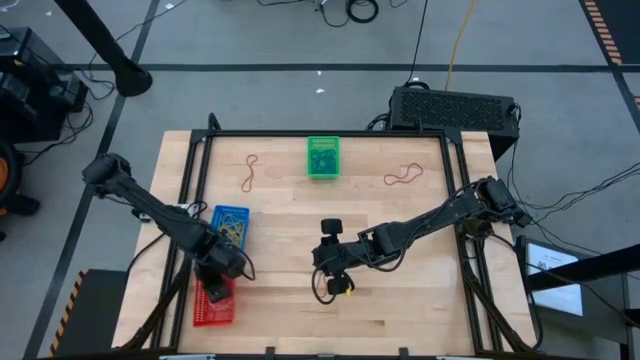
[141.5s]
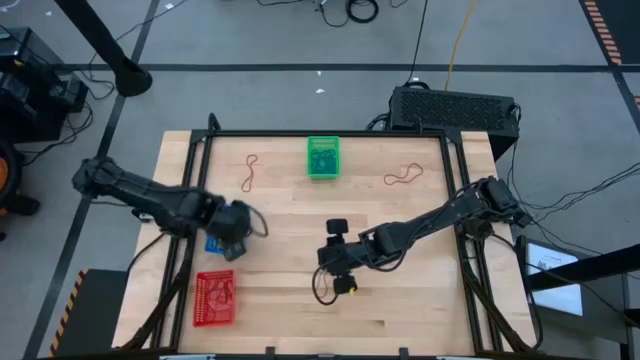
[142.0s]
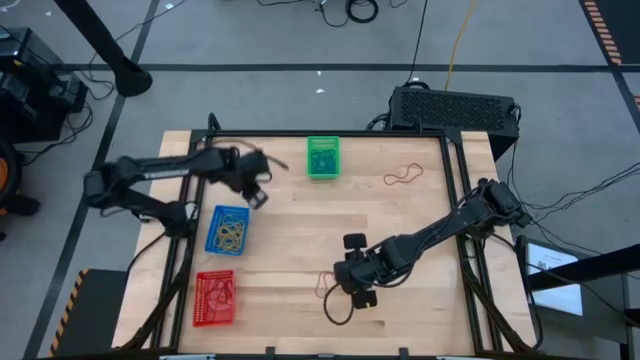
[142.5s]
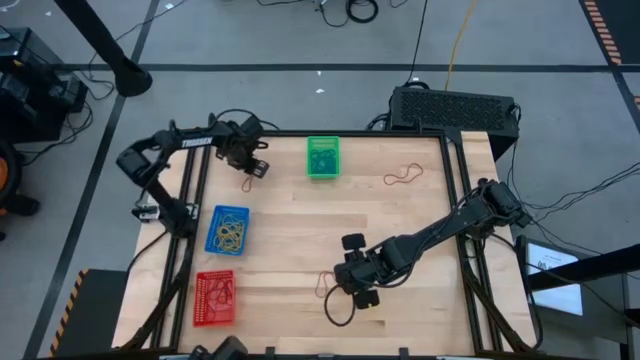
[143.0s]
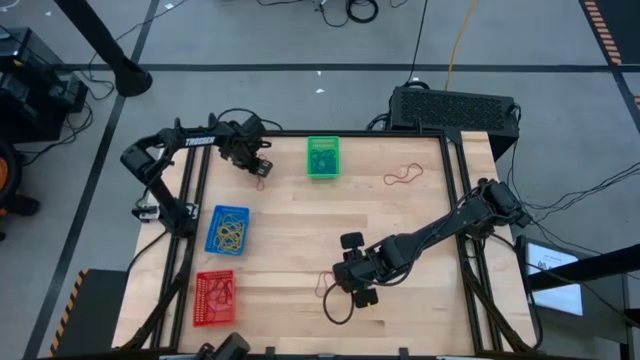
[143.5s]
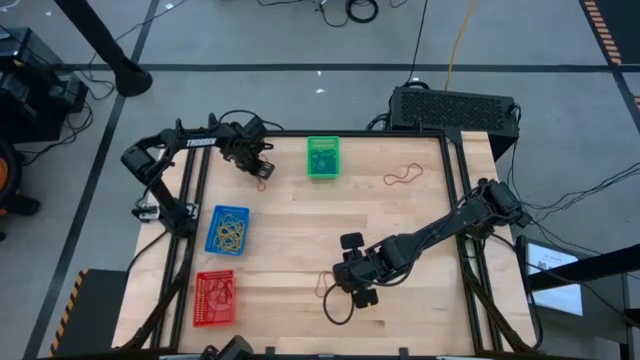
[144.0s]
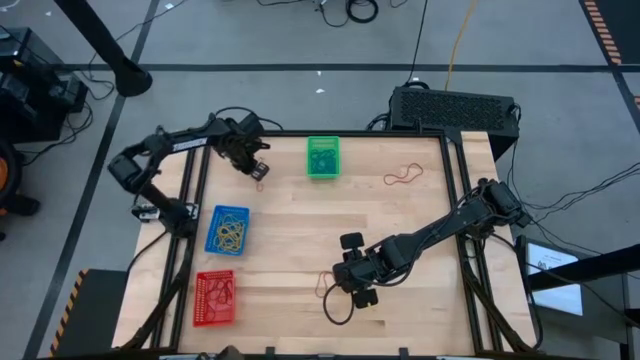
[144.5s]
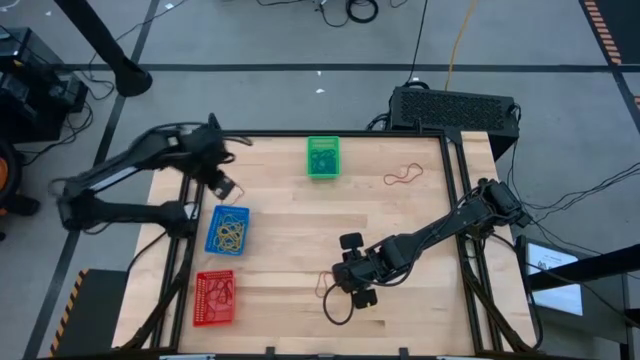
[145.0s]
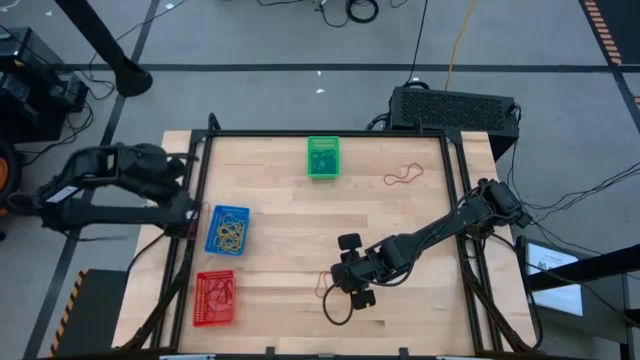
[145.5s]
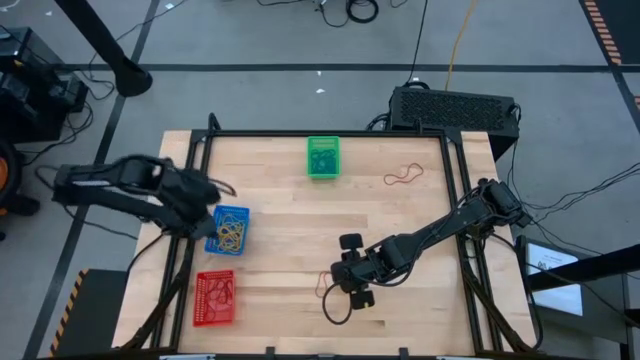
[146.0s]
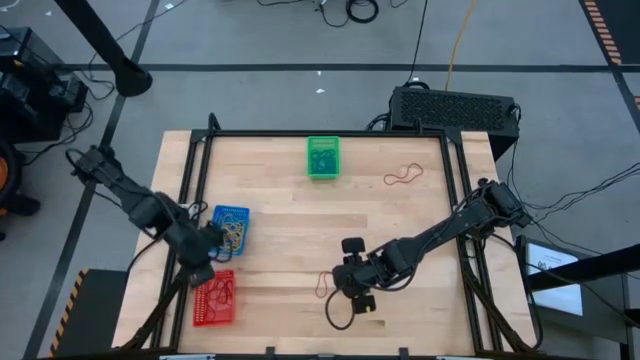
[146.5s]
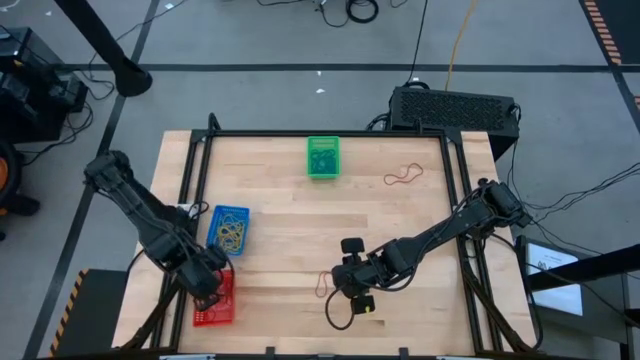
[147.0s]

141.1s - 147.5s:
Task: Sort rubber bands into baskets
Put the red rubber band into the red bin

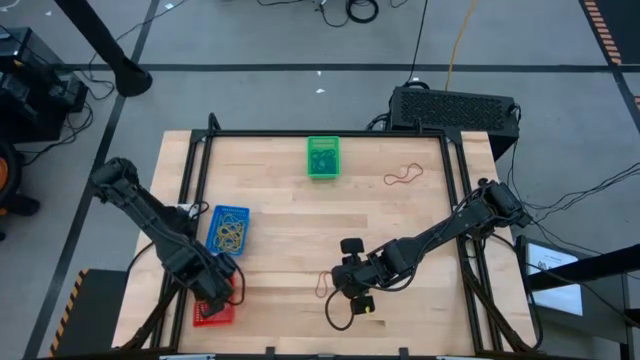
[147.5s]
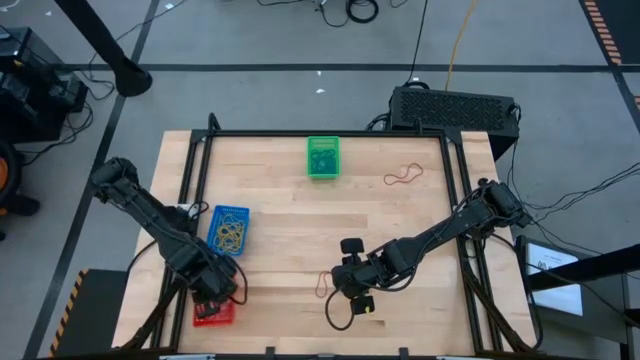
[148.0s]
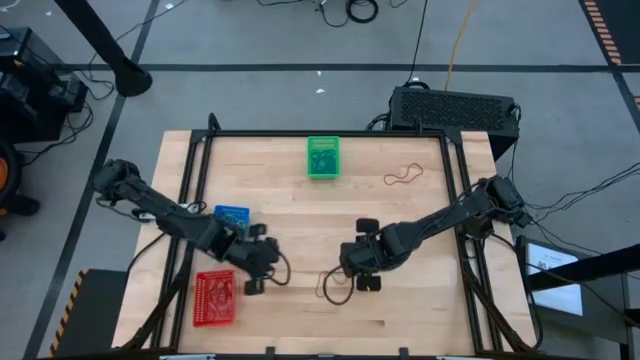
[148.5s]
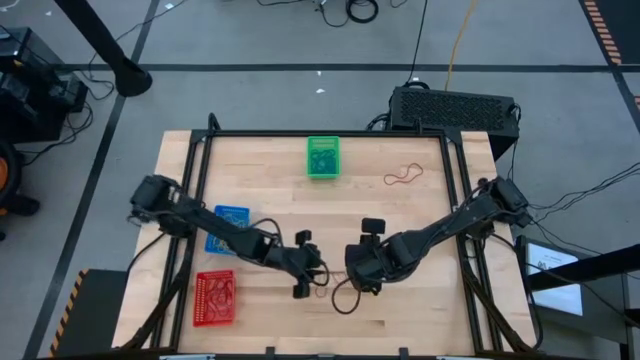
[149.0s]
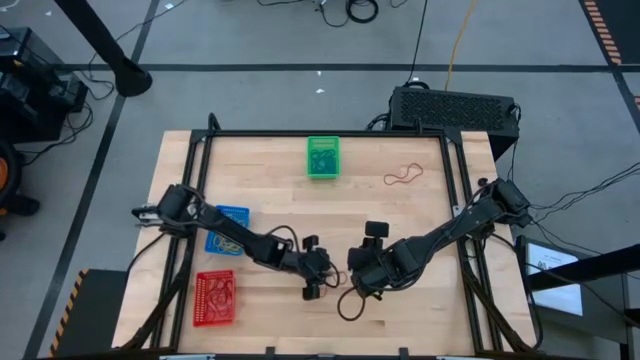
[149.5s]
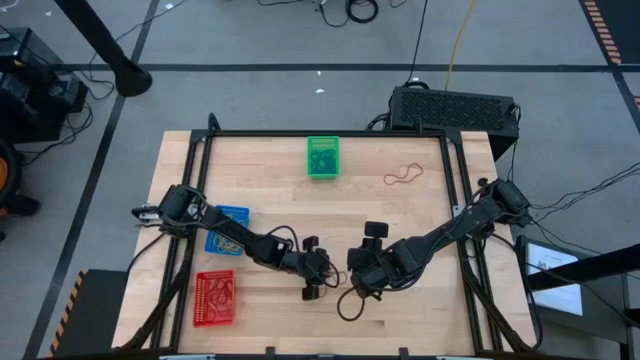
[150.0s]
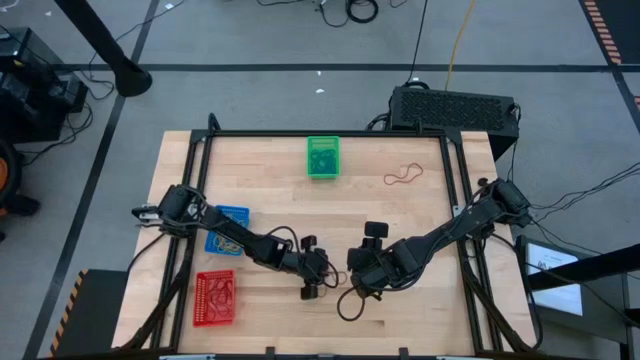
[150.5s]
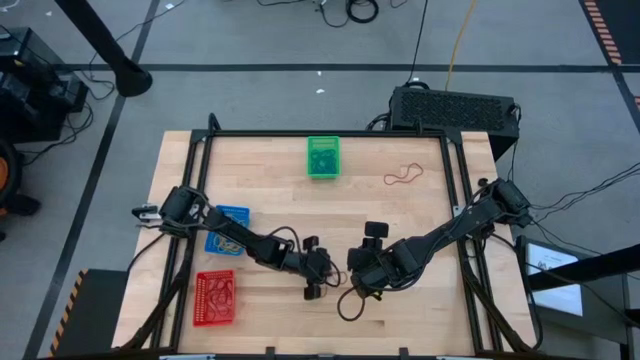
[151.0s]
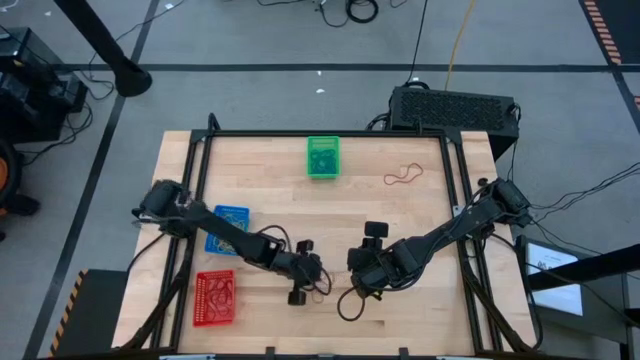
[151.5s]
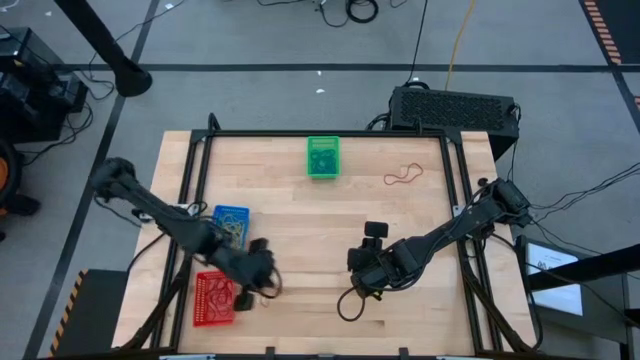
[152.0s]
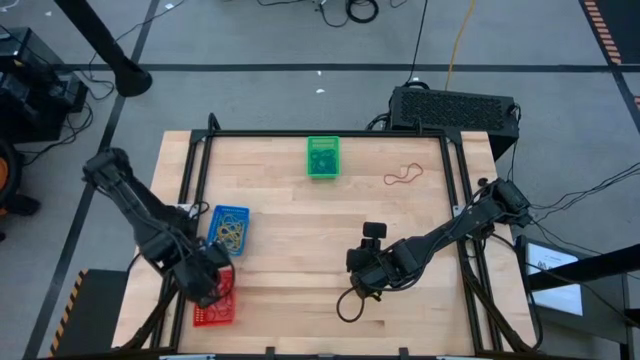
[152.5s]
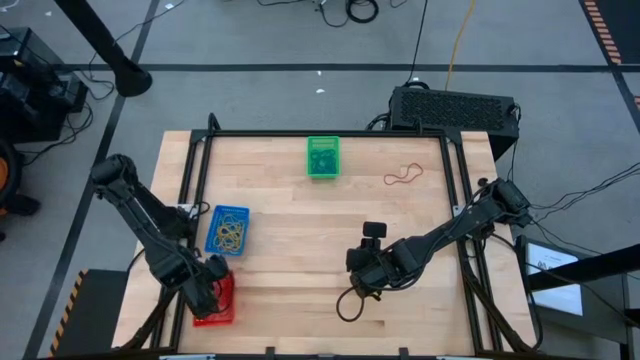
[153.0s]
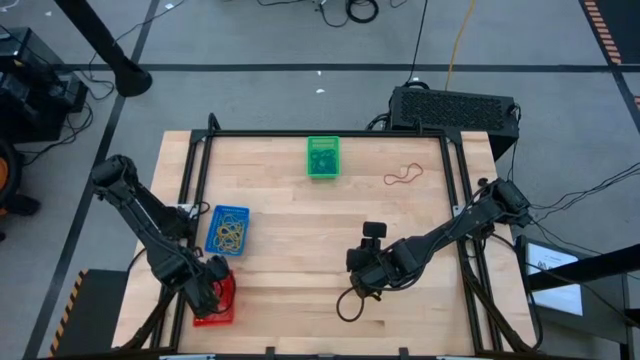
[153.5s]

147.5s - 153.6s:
Put the red rubber band into the red bin

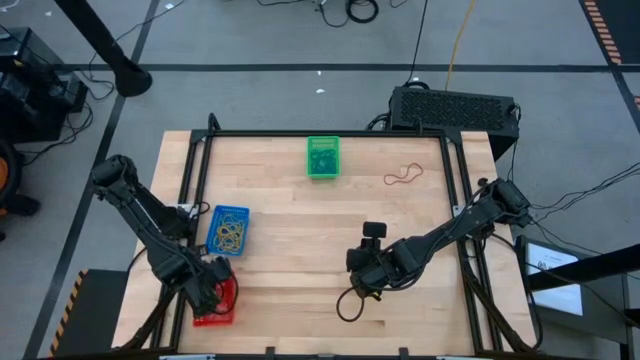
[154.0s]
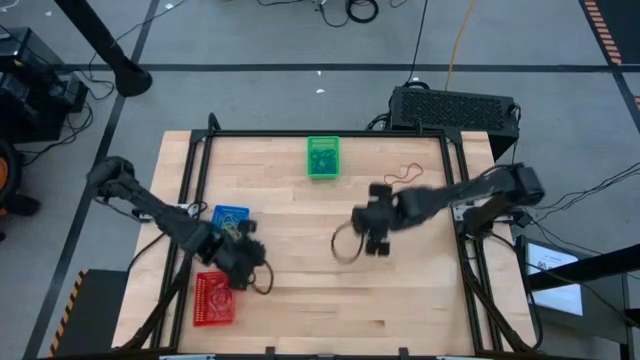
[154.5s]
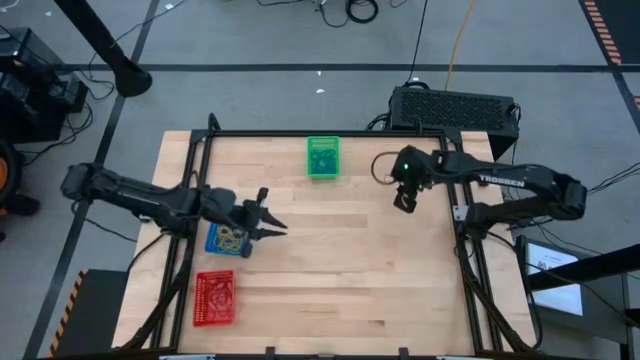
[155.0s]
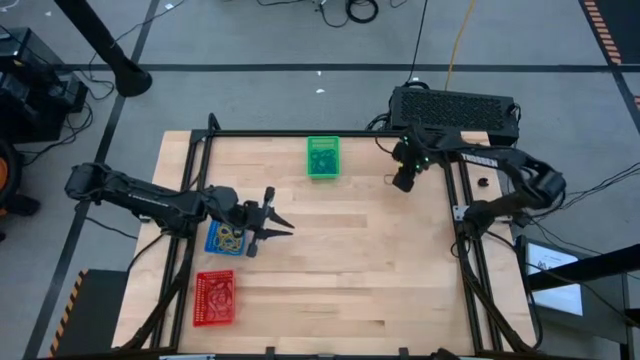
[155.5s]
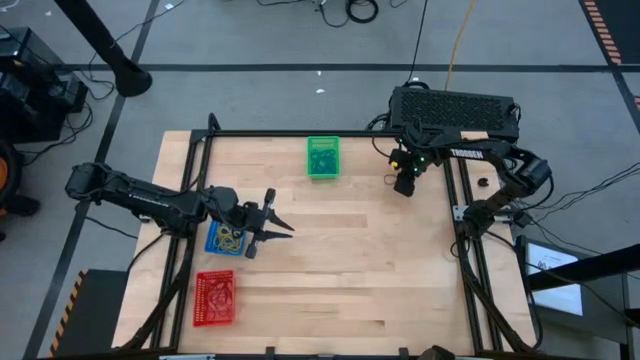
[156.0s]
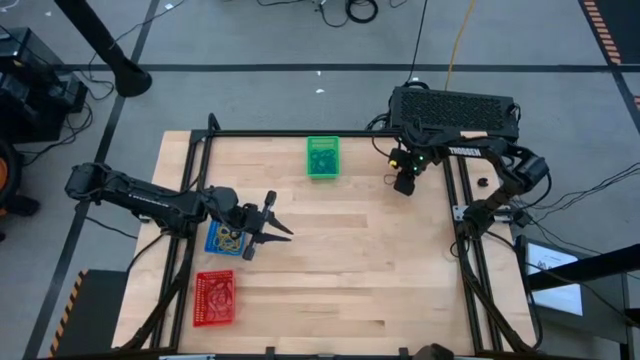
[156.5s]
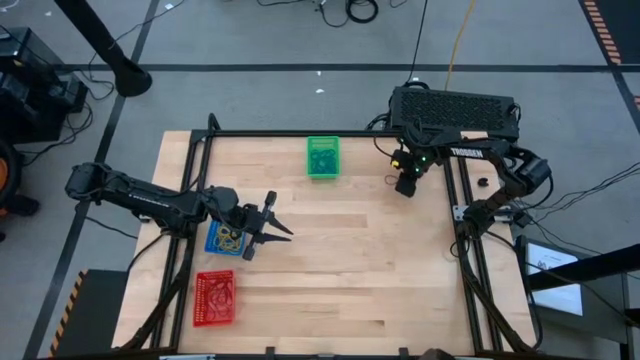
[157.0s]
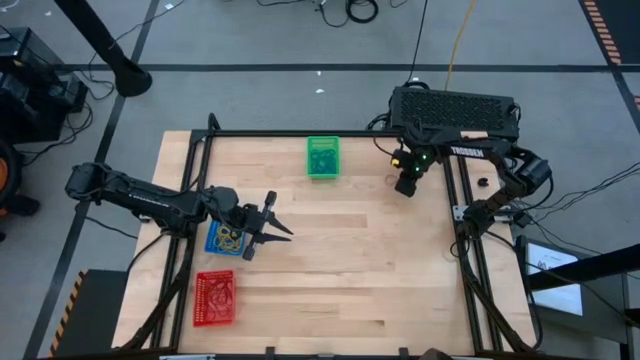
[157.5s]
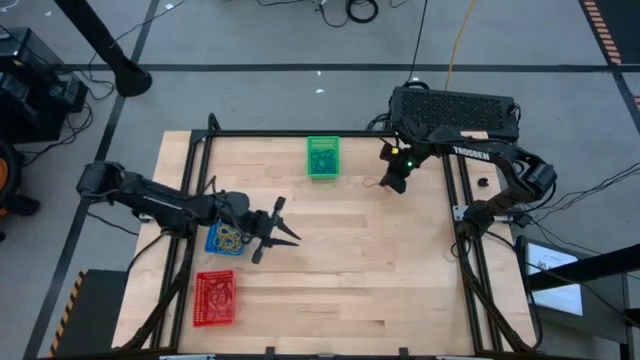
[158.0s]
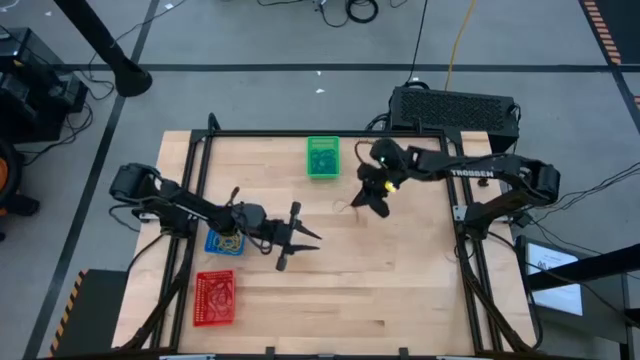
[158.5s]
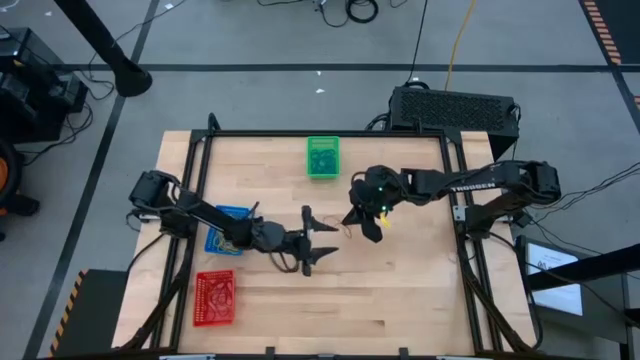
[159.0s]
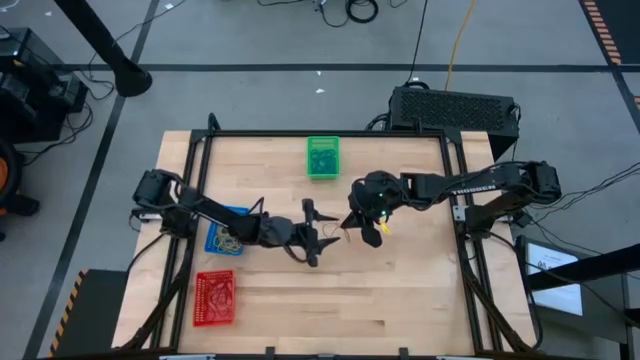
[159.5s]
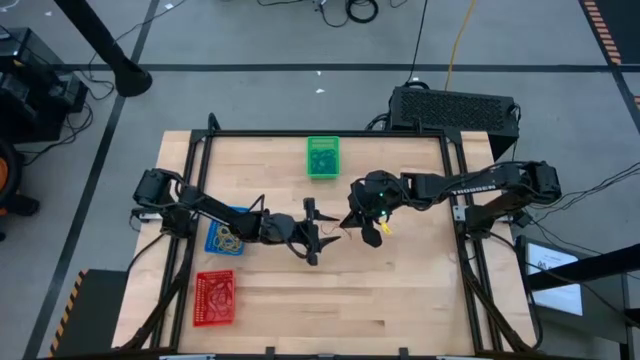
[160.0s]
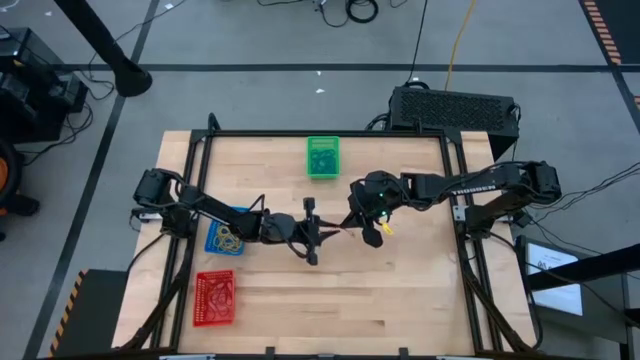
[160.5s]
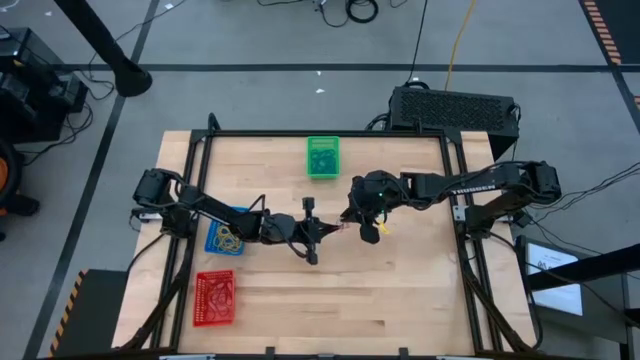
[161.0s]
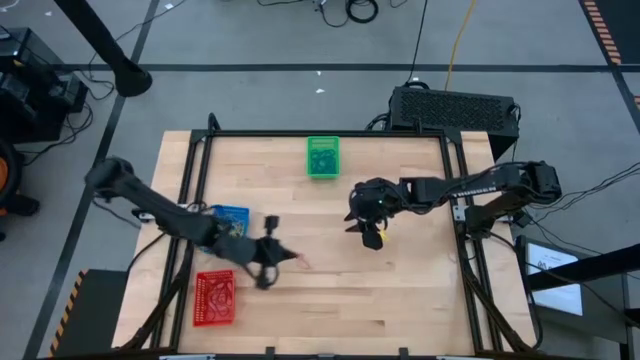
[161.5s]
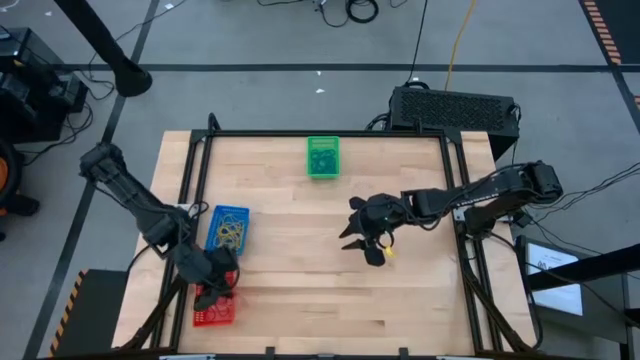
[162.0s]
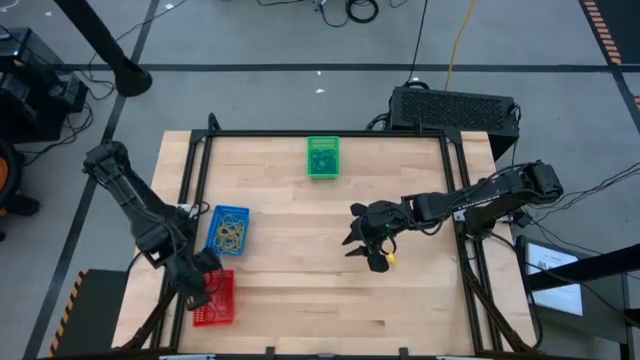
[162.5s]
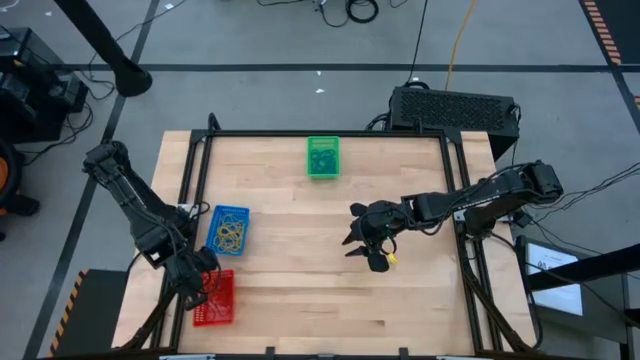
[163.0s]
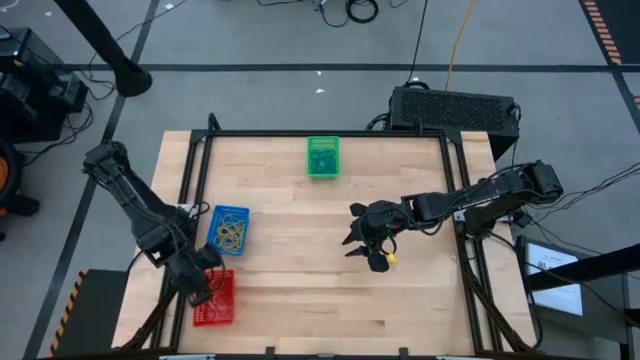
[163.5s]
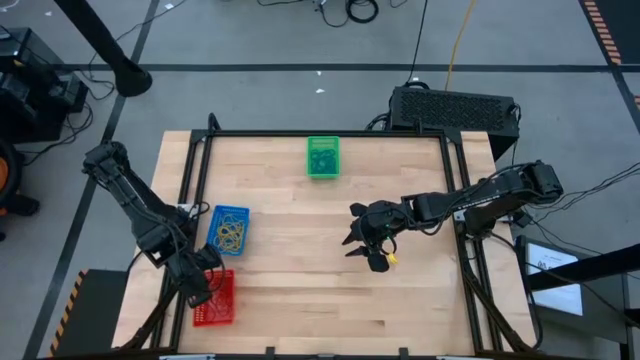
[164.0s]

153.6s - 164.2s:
Put the red rubber band into the red bin
